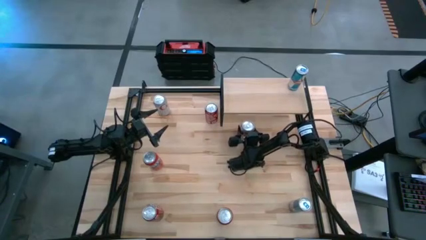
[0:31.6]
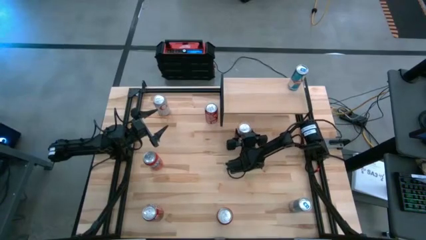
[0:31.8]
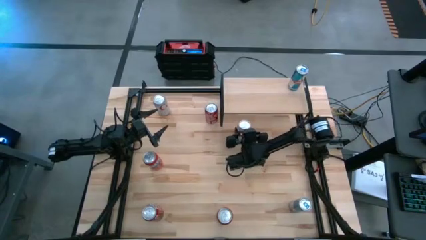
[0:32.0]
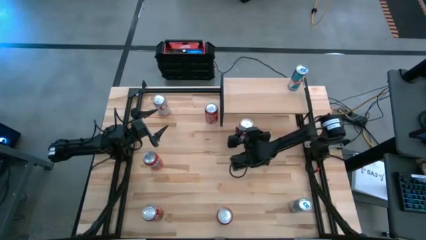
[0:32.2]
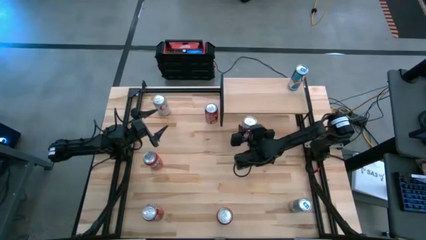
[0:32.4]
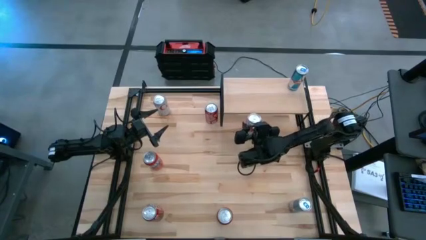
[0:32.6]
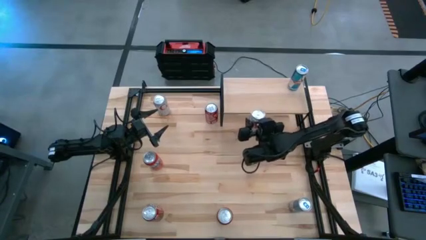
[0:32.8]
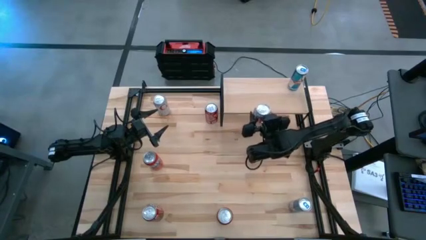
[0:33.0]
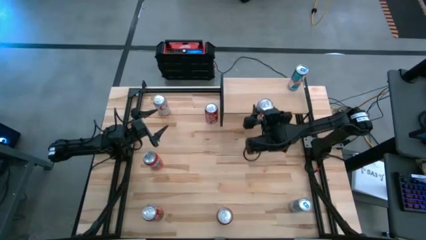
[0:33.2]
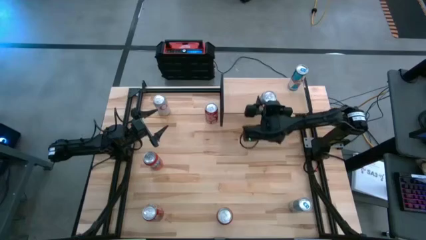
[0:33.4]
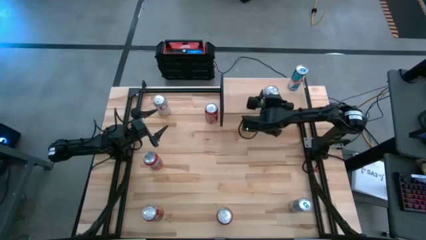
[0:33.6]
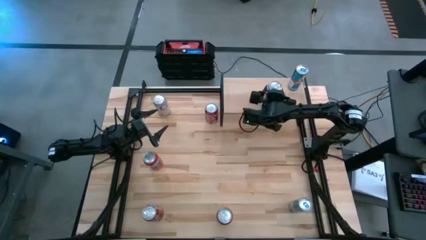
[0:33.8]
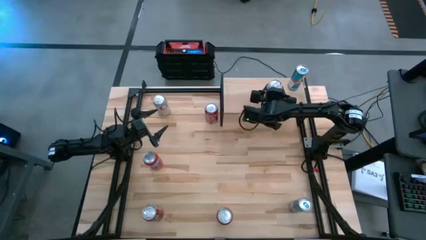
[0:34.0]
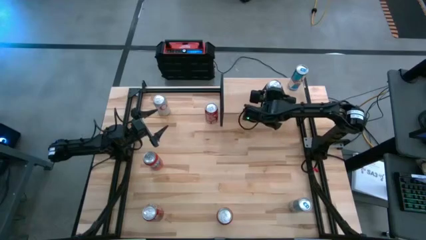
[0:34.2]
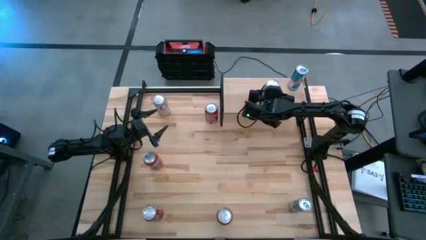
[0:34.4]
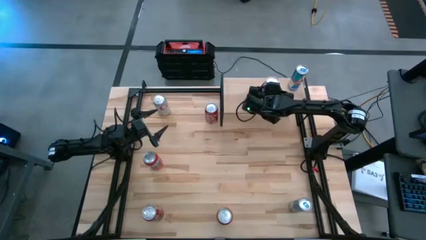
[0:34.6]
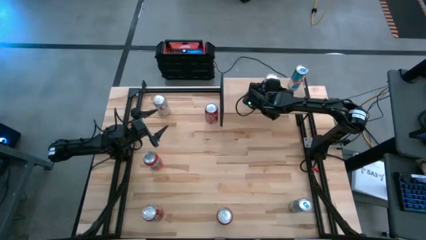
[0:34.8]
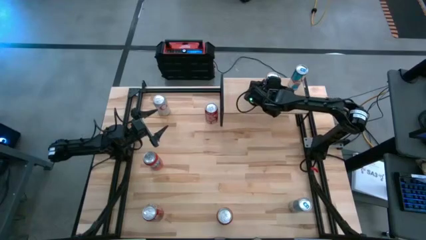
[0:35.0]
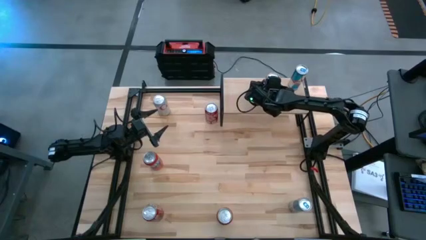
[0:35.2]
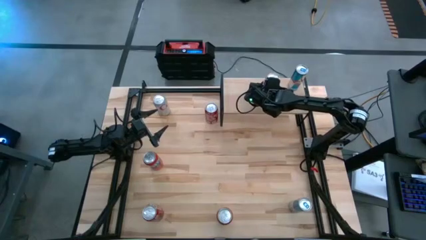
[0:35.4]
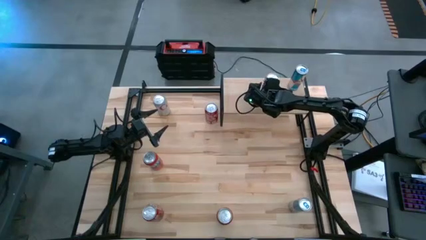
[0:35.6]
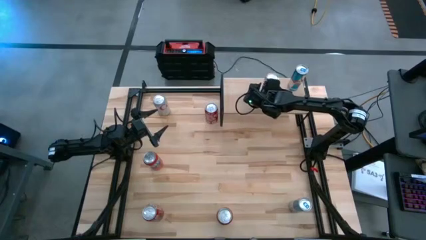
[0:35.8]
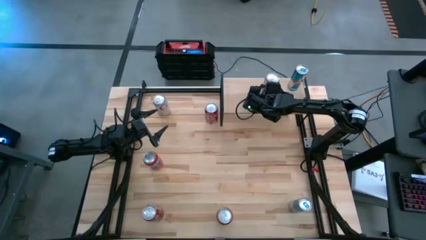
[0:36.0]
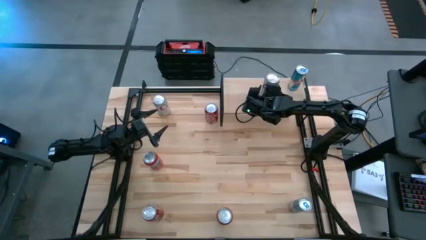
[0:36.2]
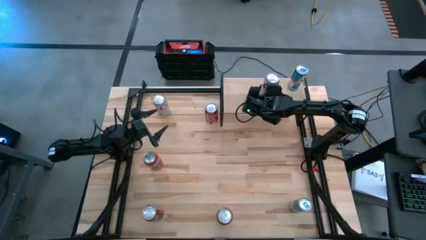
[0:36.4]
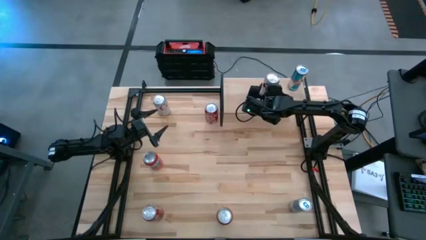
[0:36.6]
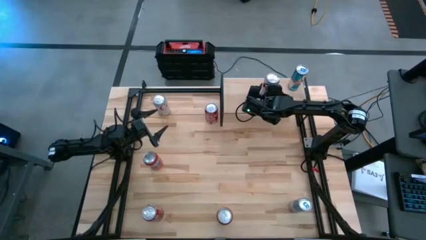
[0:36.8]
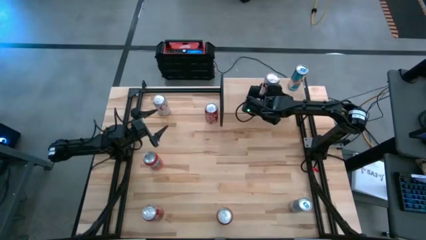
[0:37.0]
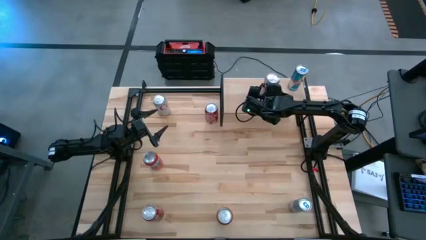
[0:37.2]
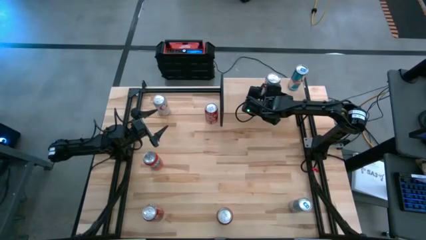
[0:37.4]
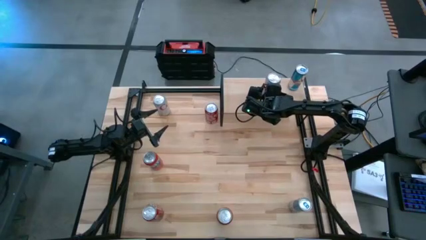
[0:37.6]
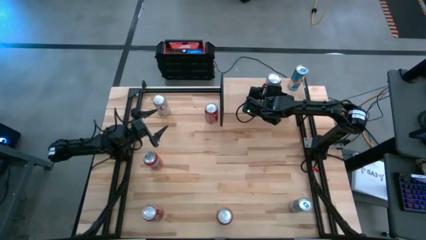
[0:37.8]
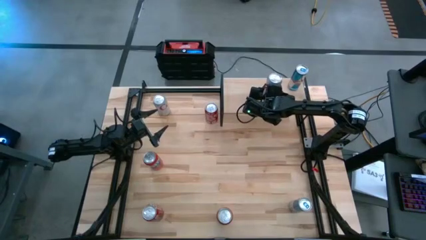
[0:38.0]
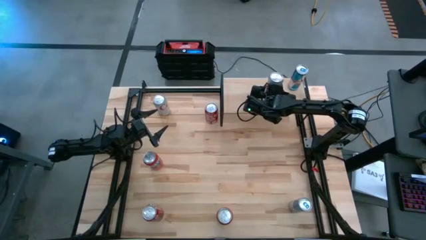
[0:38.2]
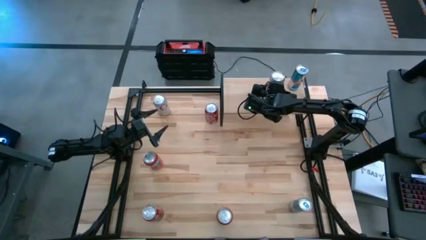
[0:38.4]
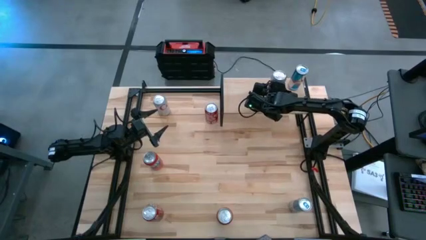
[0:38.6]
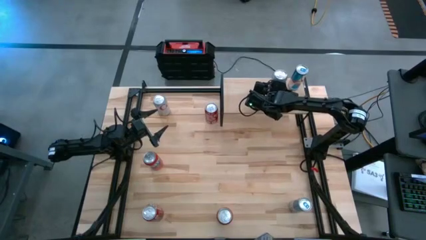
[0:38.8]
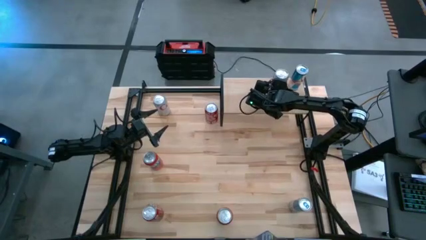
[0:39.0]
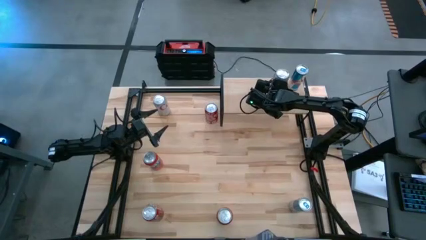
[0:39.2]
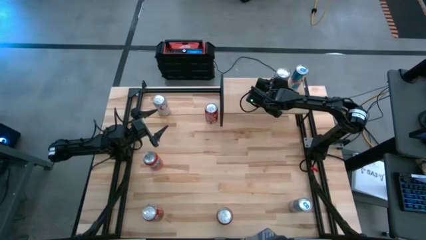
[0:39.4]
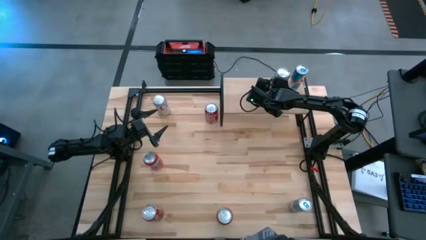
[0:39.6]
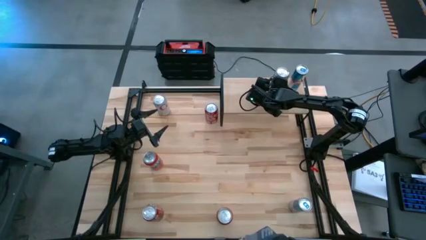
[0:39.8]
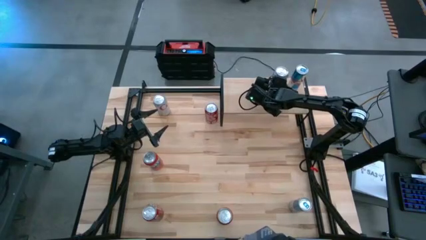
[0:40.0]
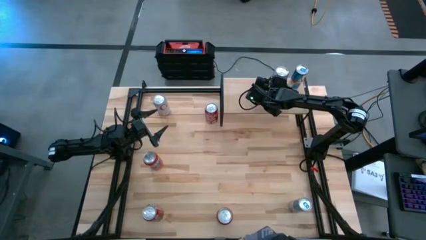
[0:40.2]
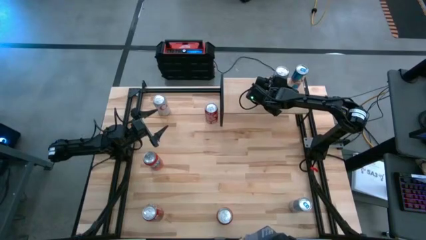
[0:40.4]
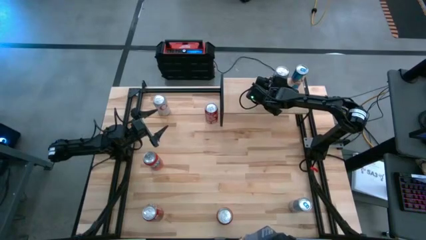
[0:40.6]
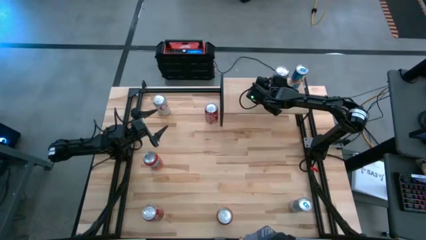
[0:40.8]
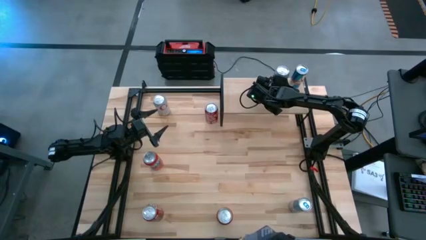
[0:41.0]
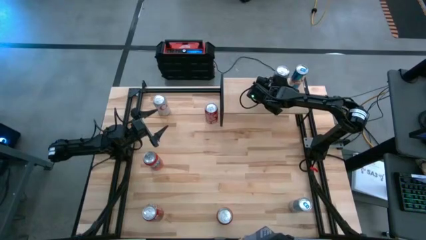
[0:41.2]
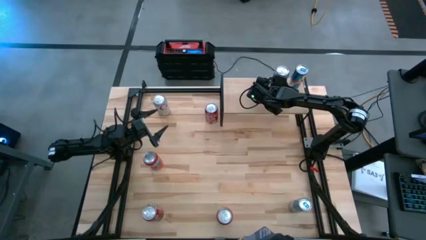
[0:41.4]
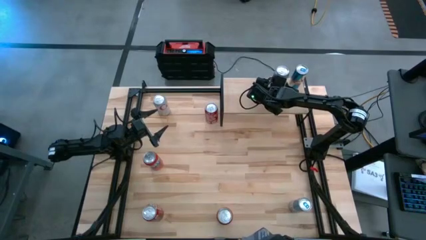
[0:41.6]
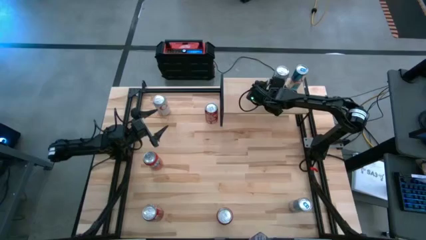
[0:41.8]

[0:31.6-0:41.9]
Task: Place canned beverage on shelf
Put the bottom silver soda can on the shelf

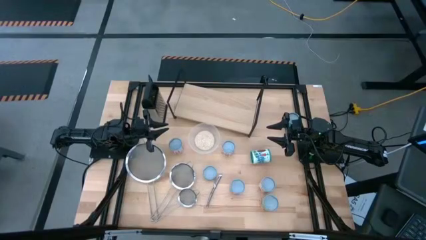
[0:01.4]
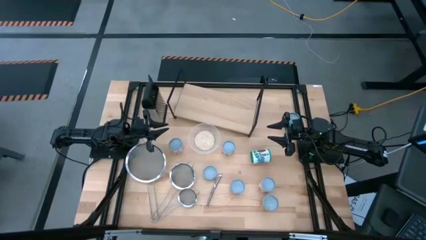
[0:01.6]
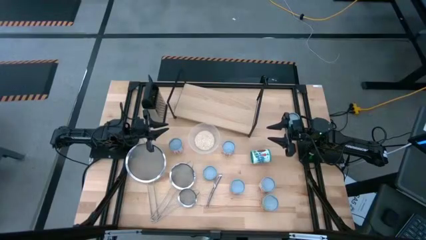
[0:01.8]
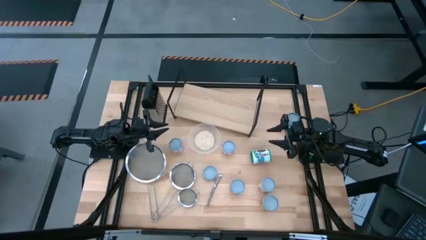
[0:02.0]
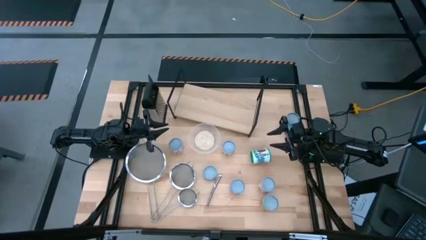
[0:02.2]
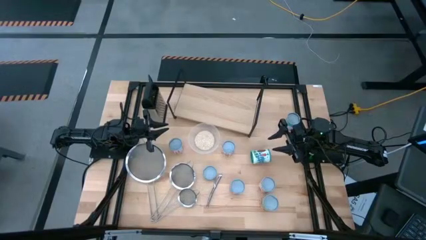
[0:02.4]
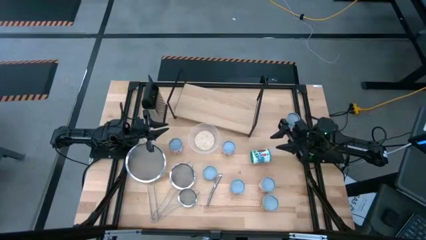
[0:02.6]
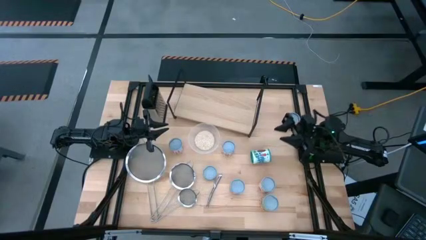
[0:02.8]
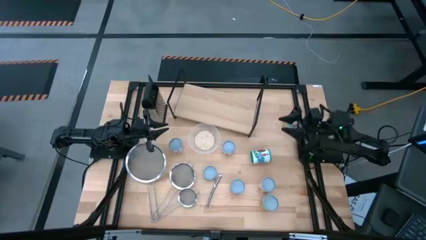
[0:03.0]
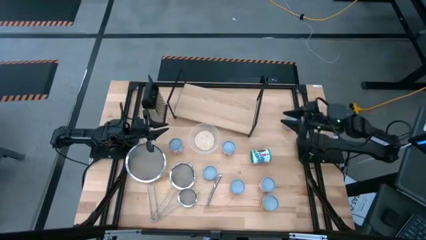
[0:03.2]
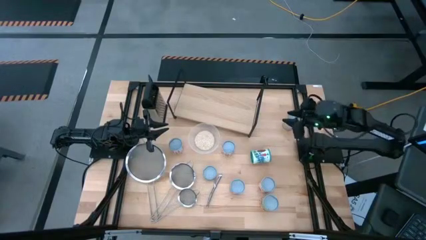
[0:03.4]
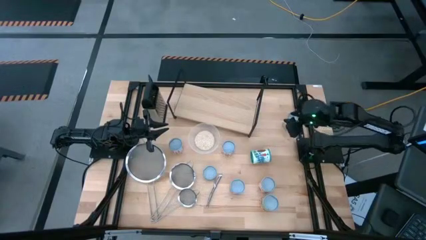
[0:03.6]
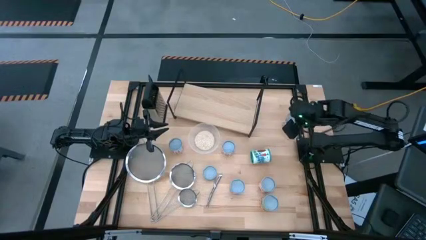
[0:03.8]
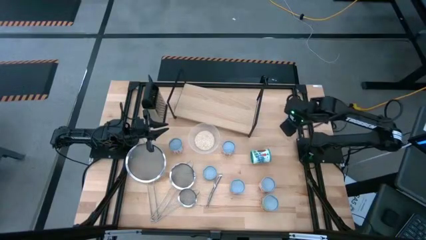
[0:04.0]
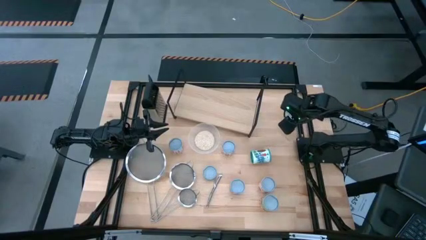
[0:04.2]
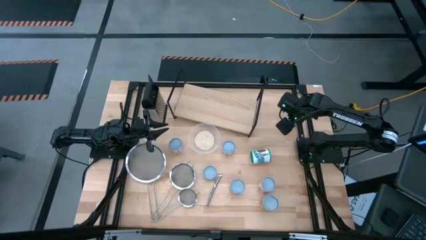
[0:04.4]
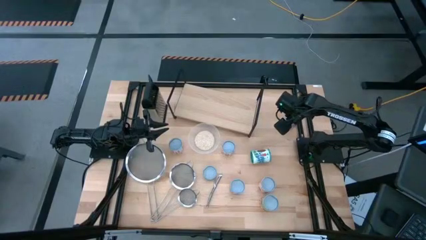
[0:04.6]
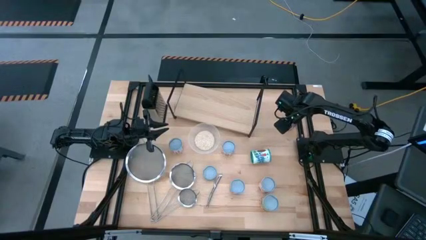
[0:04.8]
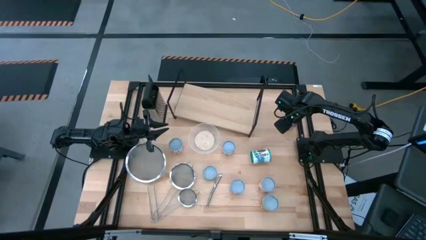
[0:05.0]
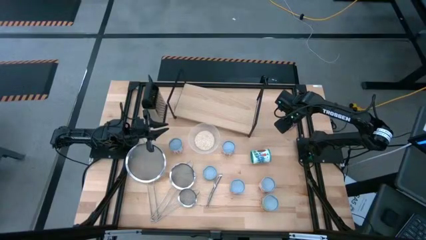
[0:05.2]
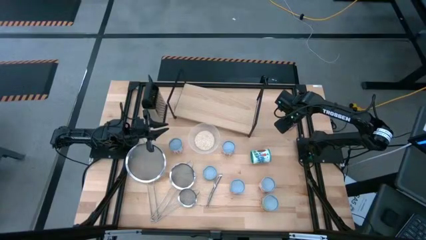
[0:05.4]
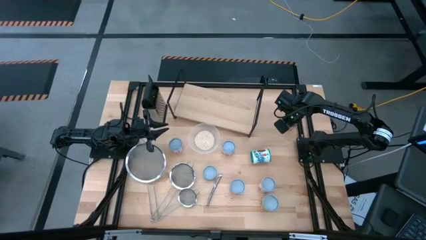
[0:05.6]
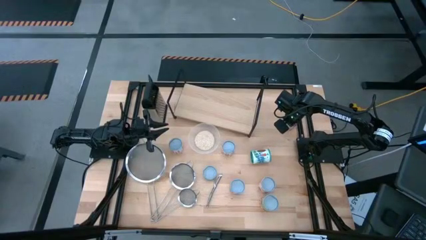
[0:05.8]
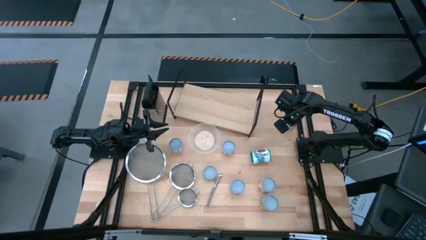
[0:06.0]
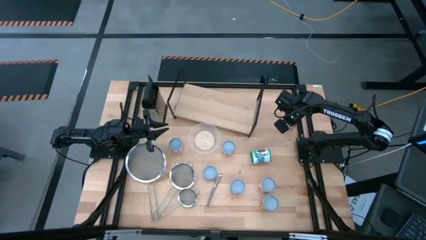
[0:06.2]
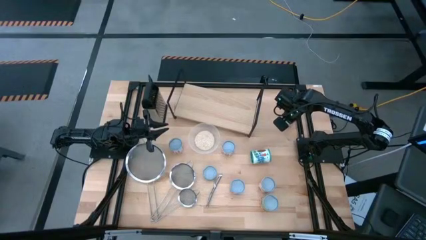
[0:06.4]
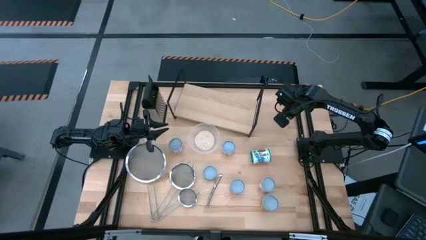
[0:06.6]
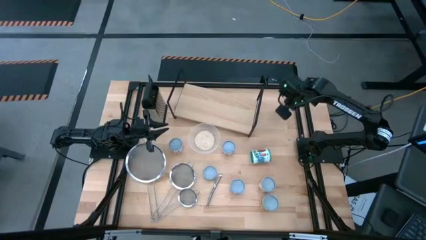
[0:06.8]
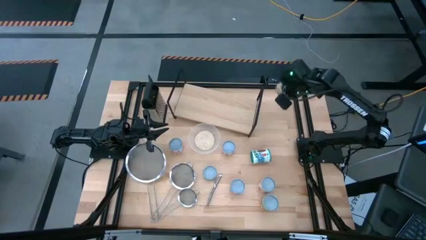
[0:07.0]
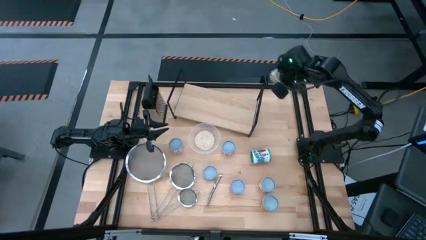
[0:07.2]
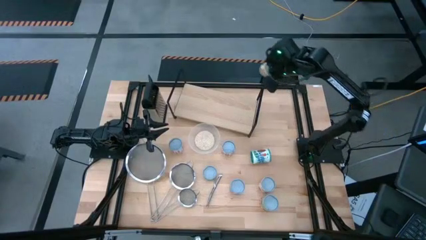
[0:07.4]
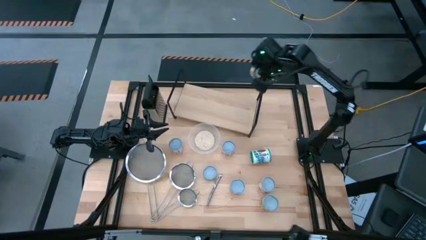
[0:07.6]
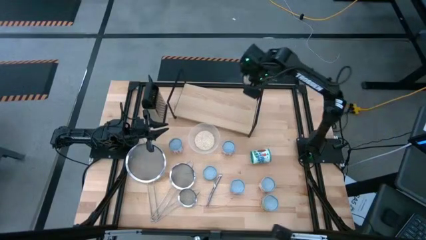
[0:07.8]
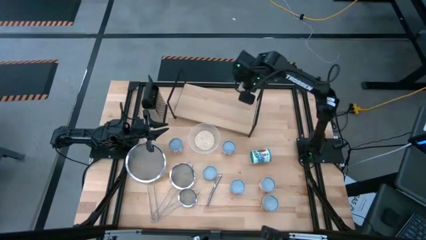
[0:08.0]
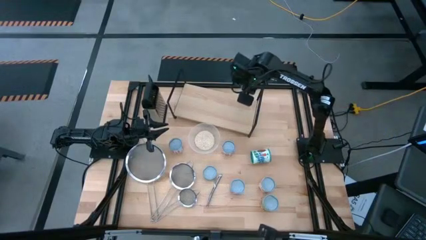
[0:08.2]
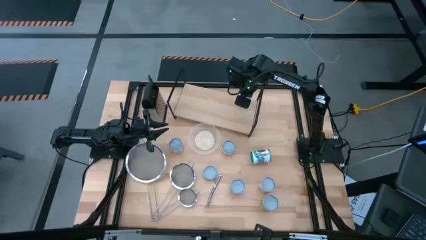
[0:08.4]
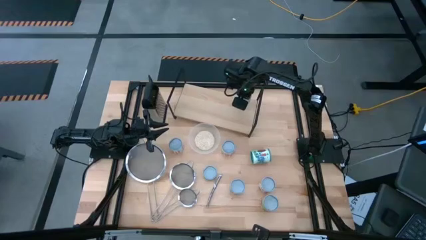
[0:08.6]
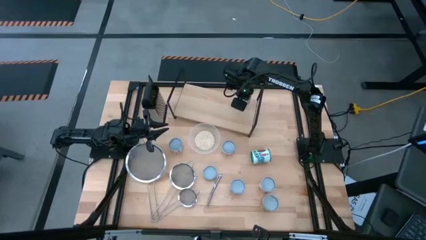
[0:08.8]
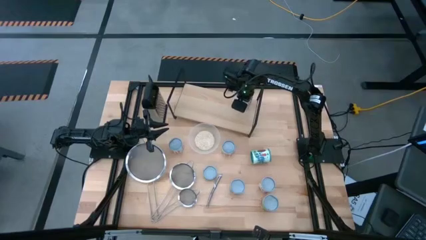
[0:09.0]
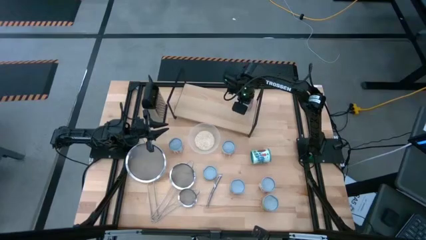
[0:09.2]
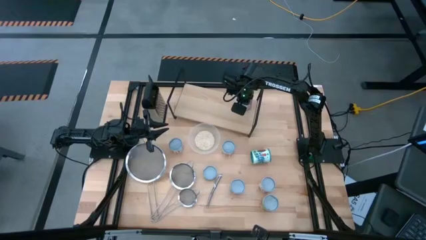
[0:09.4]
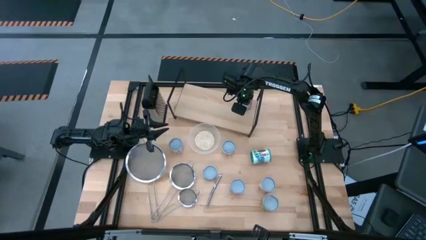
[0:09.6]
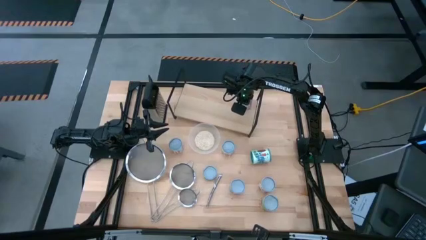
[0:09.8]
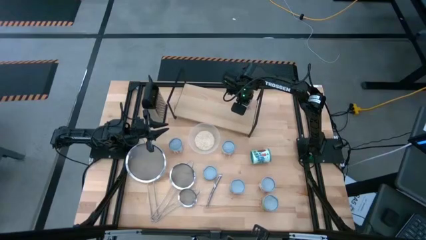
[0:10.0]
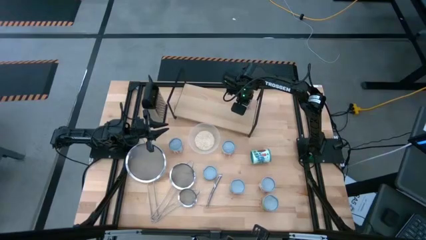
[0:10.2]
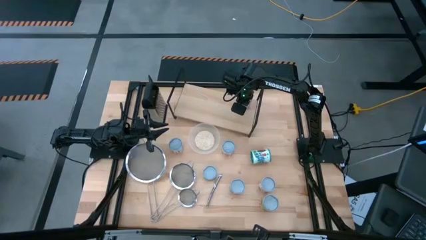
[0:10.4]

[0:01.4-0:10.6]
Task: Pick and place cans onto a shelf
Put the canned chicken soup on the shelf
